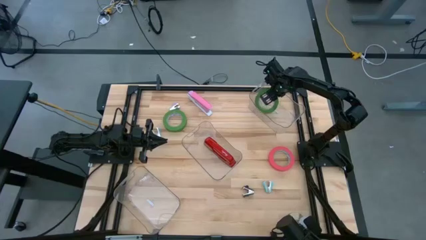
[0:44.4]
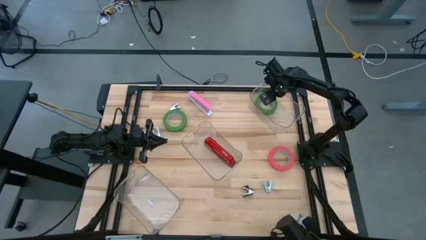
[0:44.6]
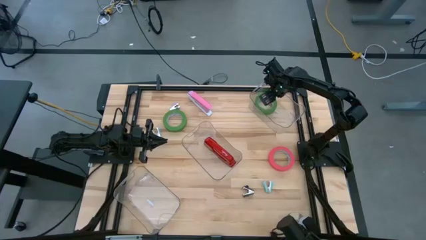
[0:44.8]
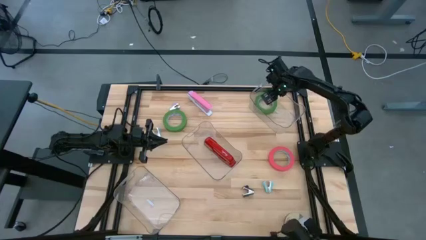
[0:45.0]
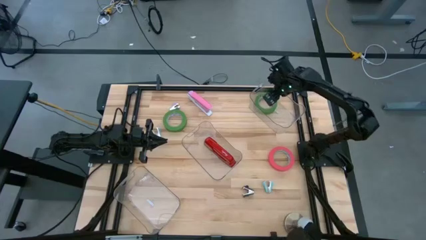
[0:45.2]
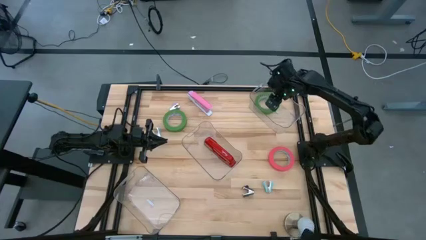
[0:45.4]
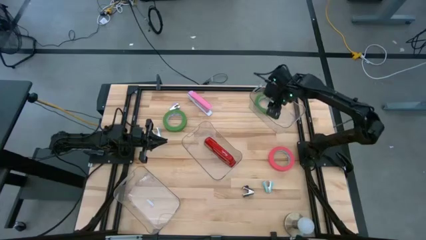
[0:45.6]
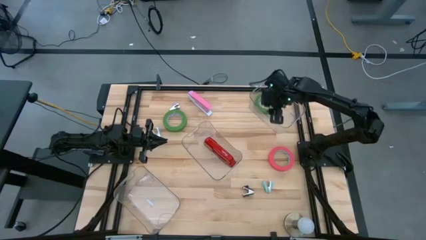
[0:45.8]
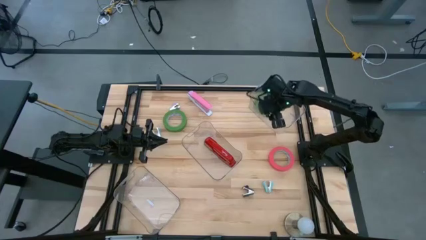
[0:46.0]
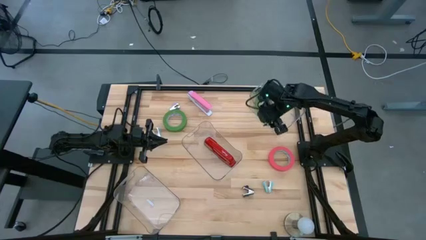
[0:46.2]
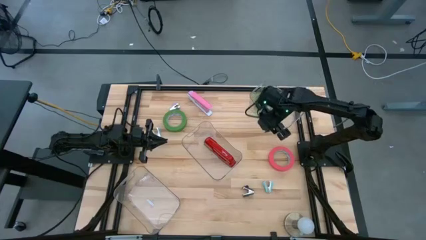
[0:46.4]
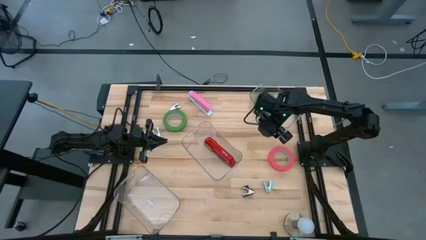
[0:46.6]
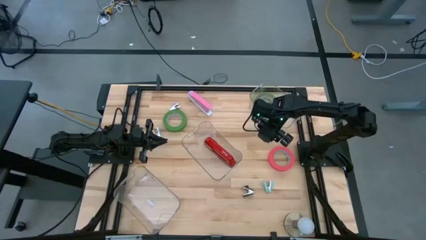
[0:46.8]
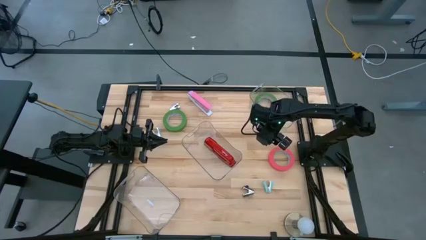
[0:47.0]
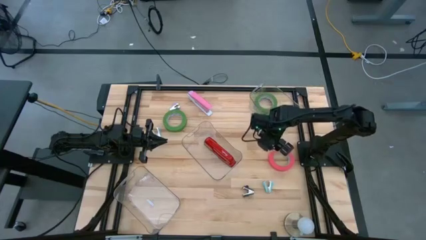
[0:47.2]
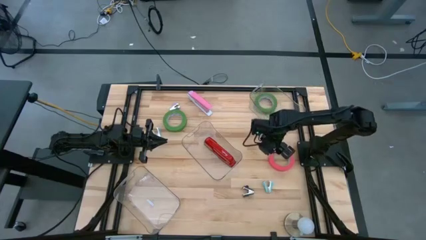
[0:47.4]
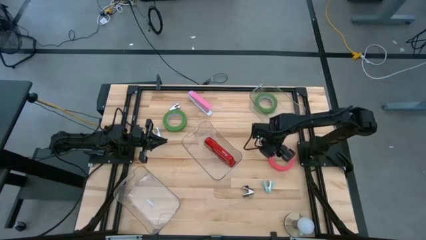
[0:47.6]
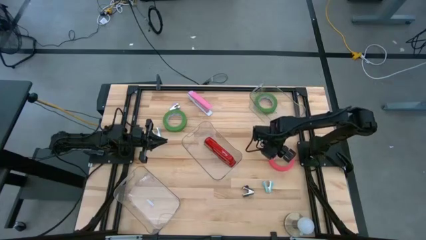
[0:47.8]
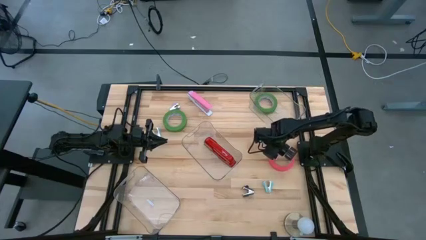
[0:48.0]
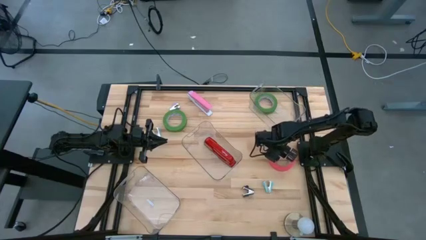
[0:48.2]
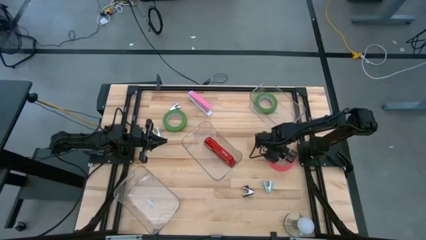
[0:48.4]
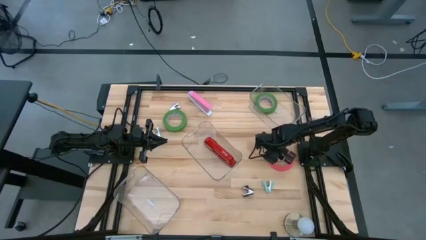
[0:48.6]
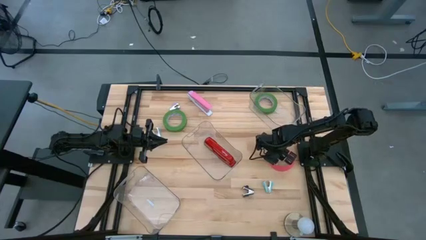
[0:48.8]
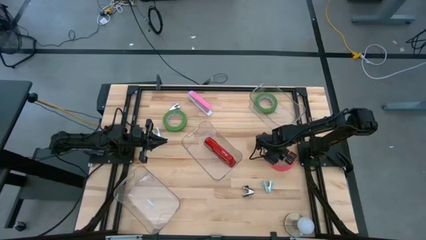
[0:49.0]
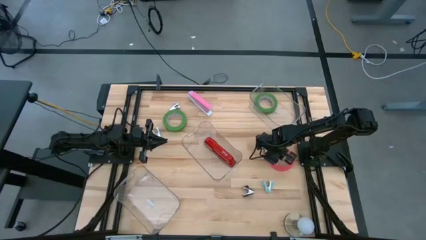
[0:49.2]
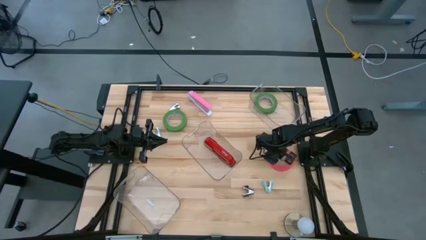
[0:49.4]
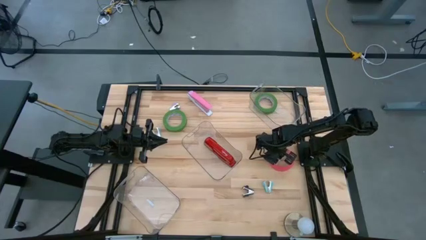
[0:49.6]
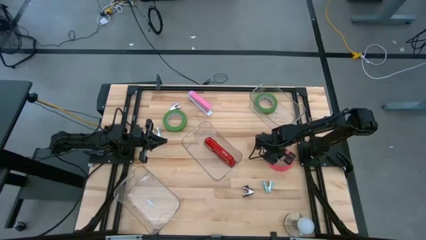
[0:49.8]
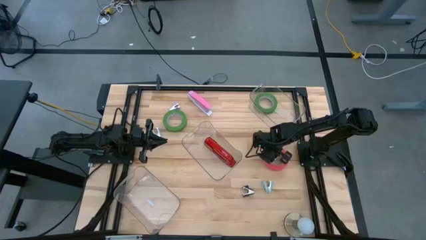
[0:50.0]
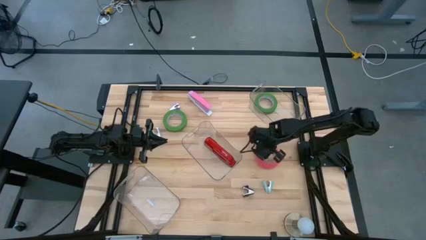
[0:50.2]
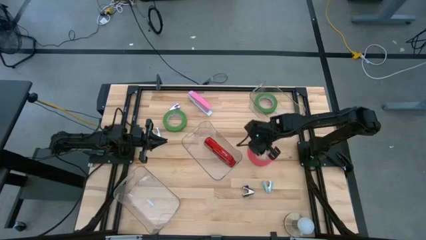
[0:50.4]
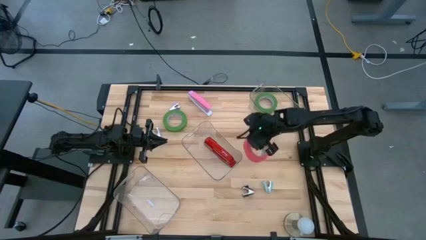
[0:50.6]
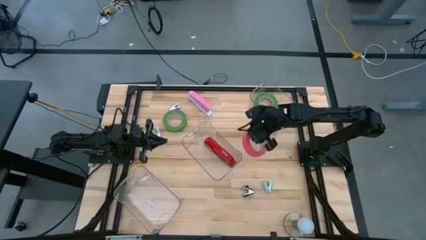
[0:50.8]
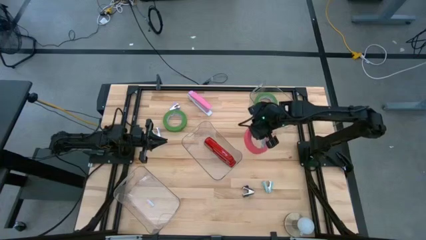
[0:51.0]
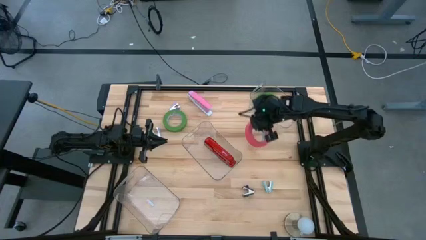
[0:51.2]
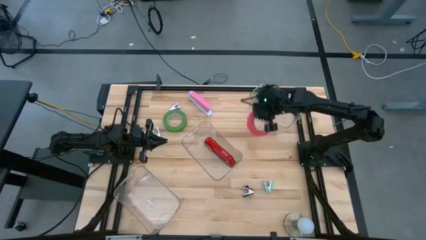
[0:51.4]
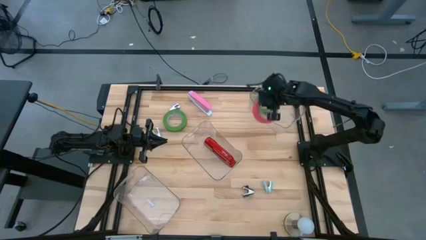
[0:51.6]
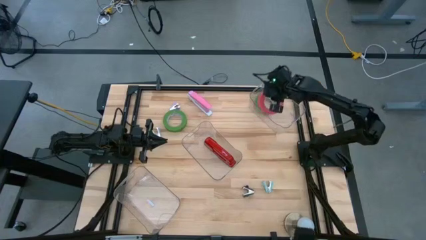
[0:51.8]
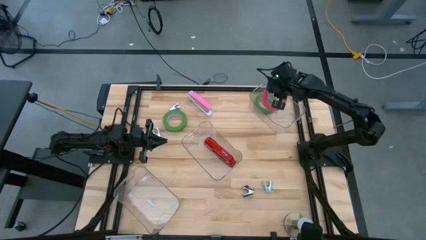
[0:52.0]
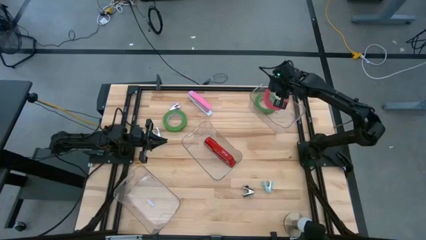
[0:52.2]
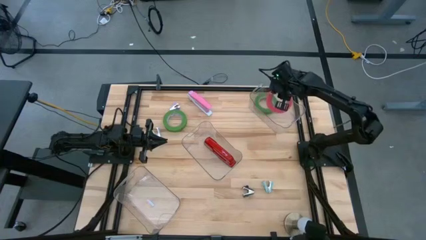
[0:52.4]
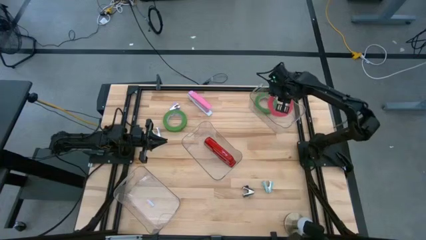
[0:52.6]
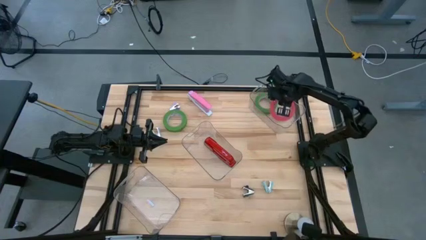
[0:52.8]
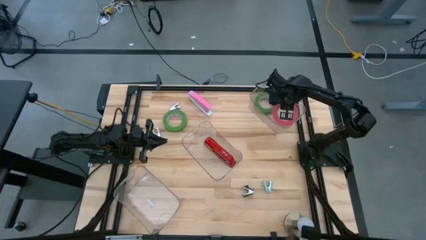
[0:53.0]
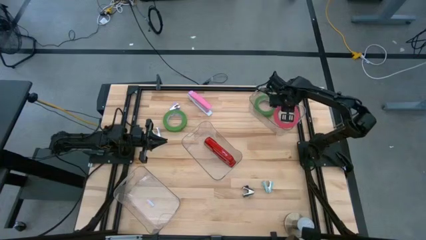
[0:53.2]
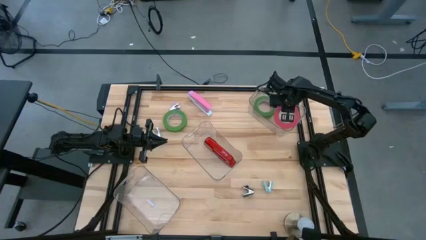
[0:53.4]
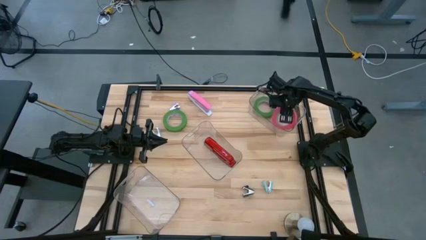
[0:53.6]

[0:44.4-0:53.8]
Task: Pick and place Stapler, Stapler remover, tape
Put the pink tape into the top transparent bin

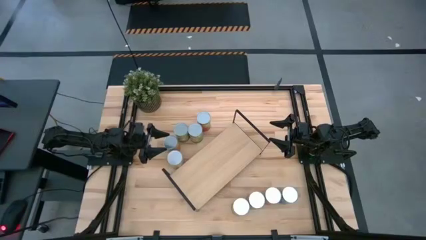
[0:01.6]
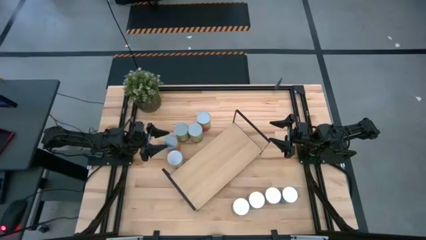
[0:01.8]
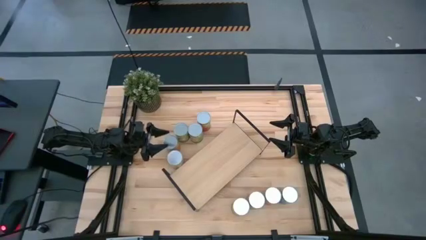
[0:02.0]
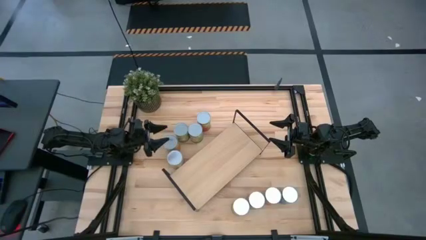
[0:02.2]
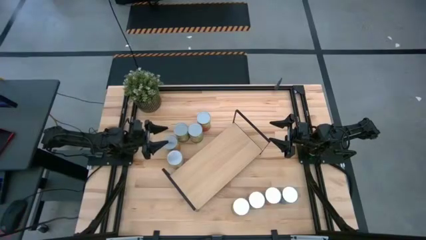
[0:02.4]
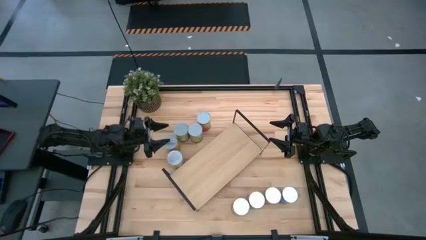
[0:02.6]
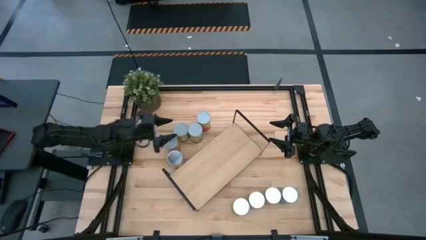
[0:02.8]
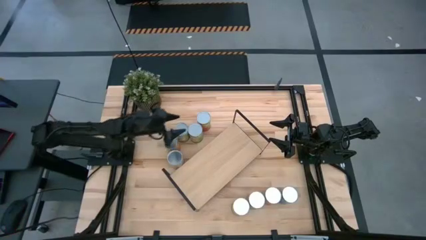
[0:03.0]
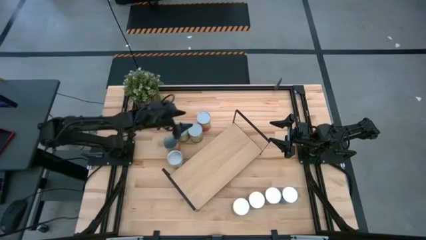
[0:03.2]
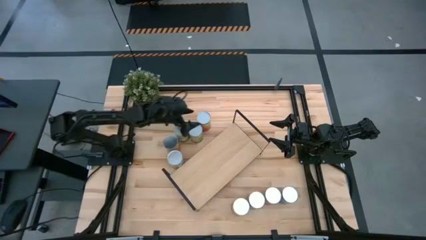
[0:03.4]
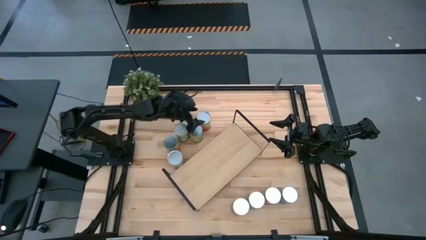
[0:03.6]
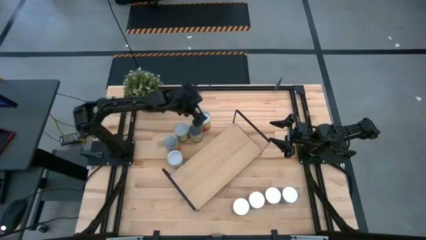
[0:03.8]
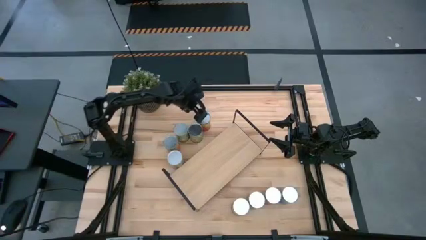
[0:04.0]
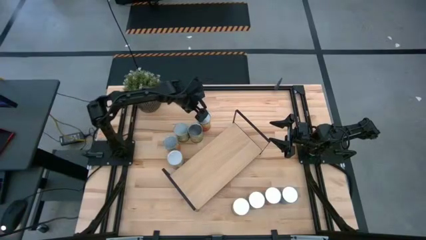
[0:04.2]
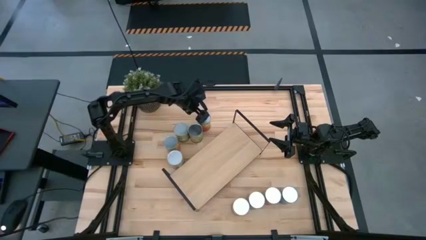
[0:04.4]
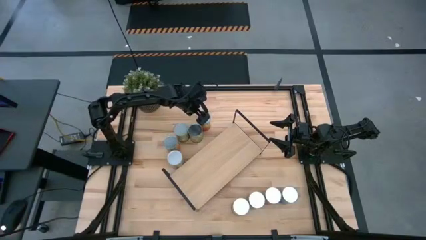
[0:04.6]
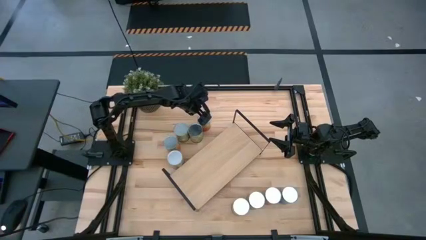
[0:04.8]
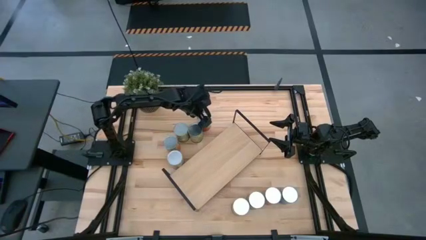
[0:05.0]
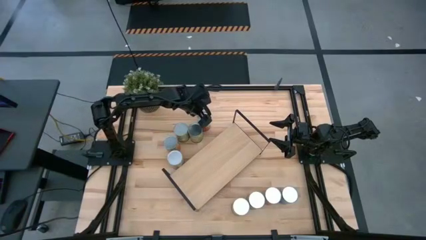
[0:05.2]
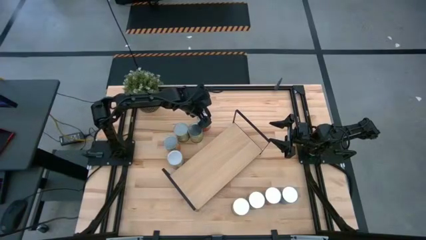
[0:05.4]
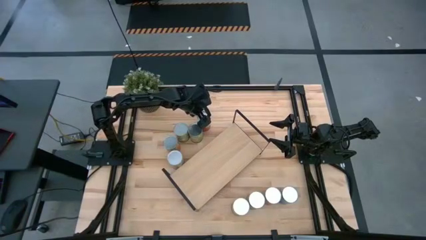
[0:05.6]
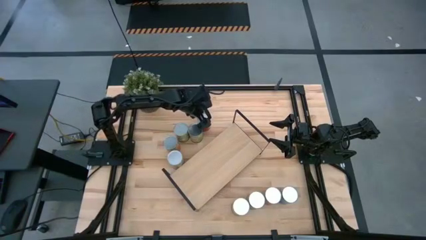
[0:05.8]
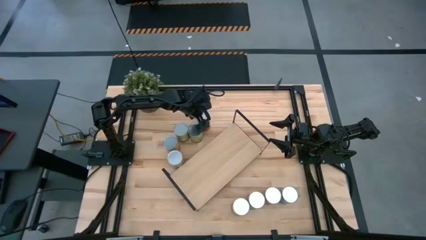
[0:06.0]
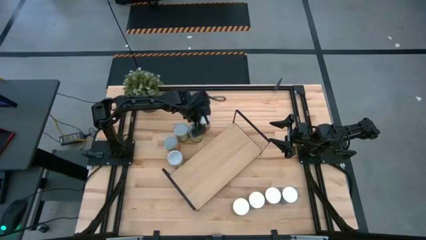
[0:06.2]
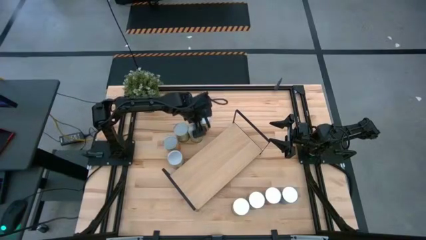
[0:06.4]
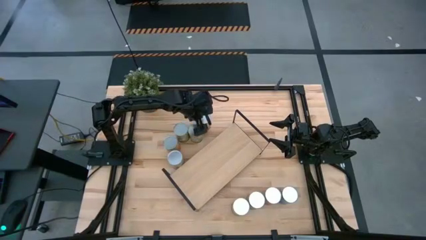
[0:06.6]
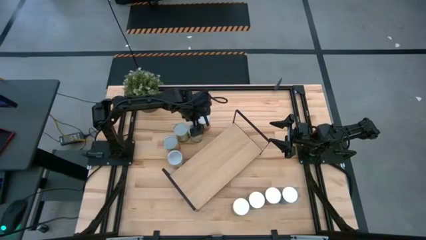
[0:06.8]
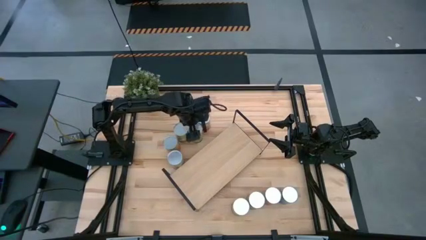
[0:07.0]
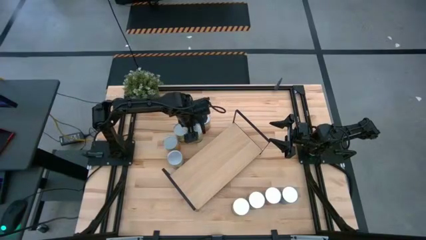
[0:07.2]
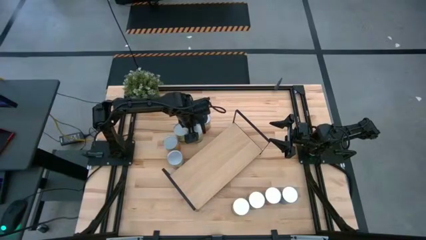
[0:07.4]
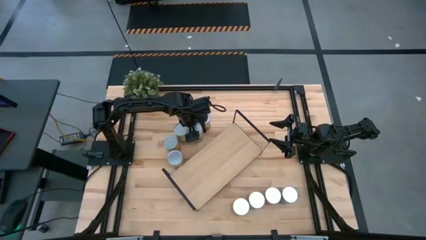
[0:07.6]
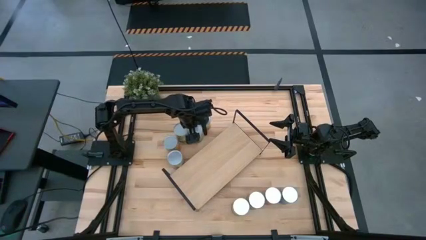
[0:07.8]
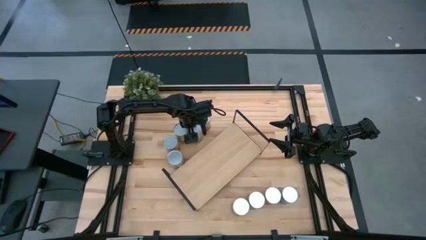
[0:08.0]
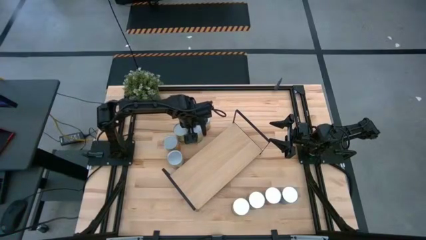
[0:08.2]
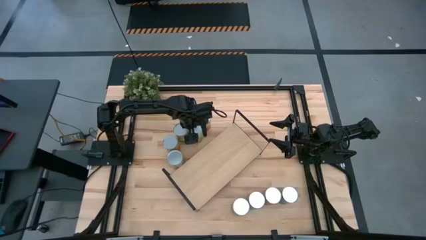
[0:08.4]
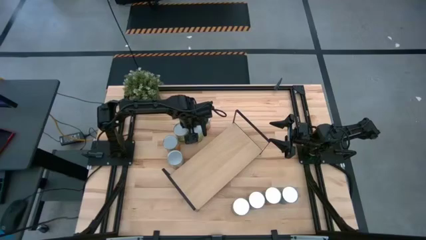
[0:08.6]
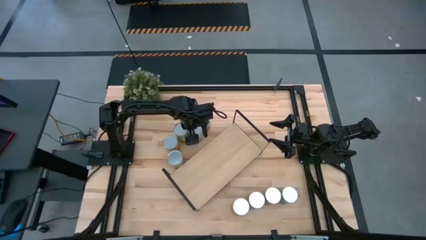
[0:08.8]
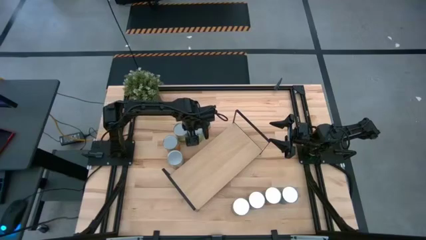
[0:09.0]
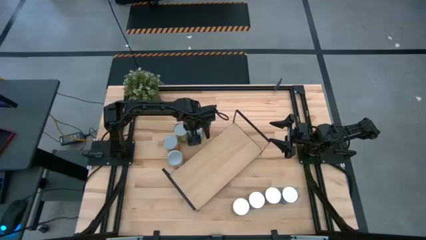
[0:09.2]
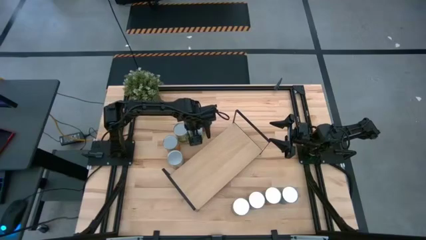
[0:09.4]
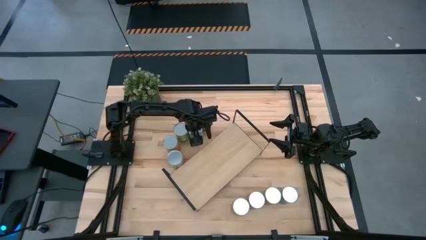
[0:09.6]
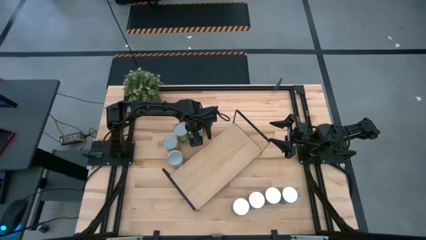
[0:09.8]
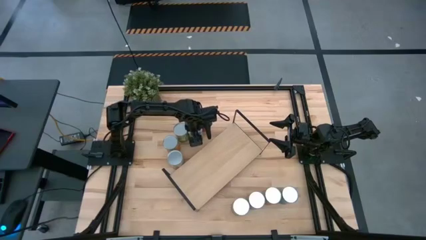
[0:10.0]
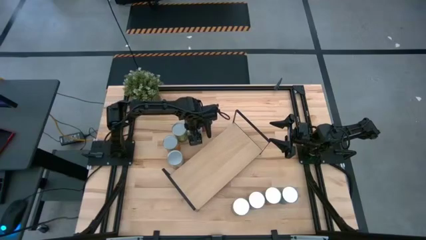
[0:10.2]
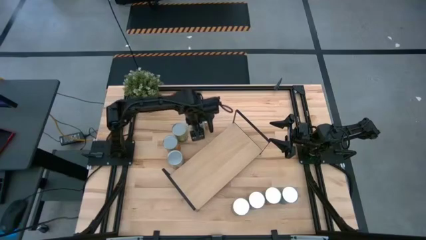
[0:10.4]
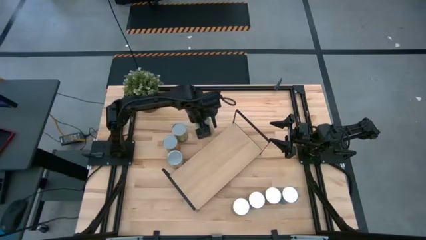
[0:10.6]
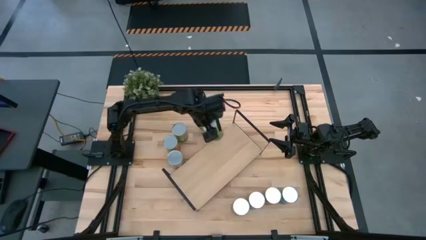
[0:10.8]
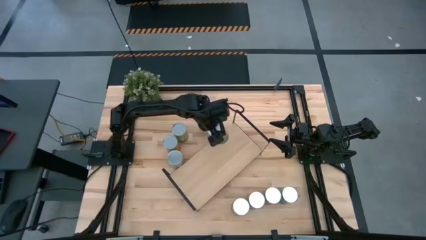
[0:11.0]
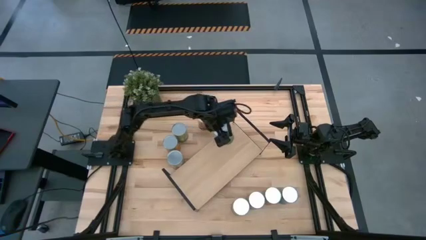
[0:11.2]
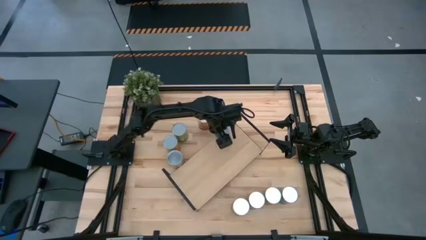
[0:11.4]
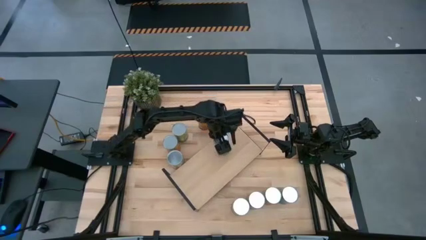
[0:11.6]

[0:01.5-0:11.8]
Task: Pick and place cans onto a shelf
Put the canned orange on the shelf
